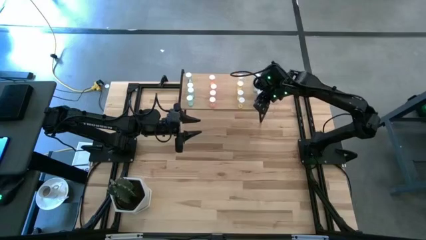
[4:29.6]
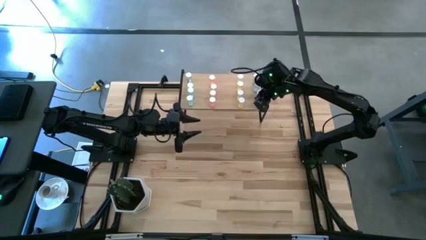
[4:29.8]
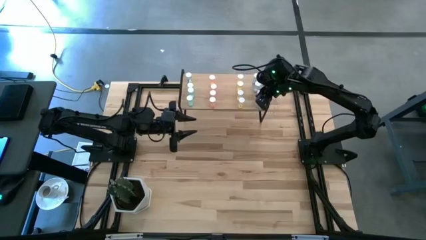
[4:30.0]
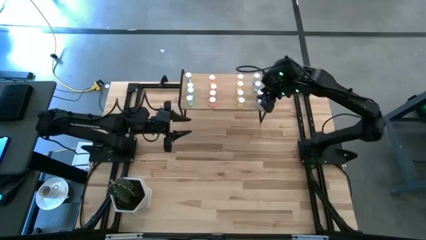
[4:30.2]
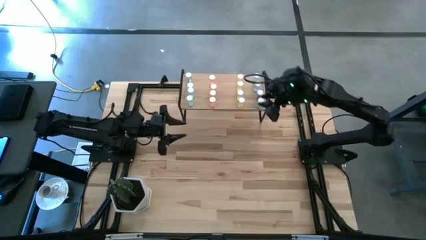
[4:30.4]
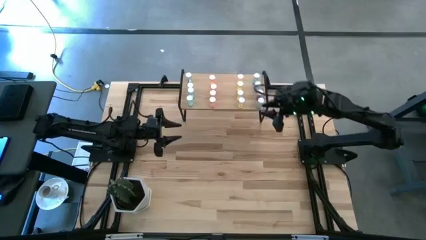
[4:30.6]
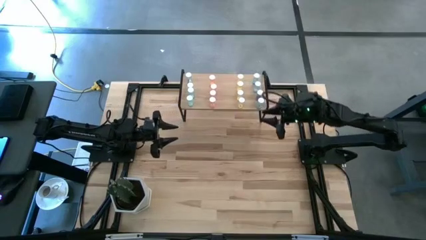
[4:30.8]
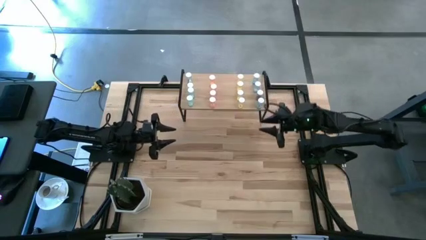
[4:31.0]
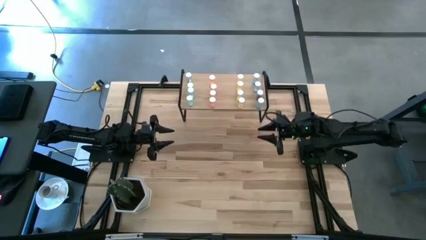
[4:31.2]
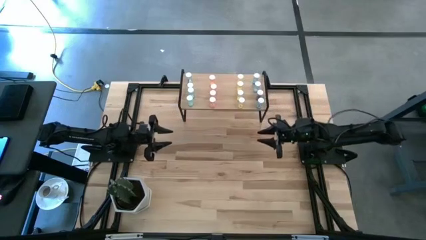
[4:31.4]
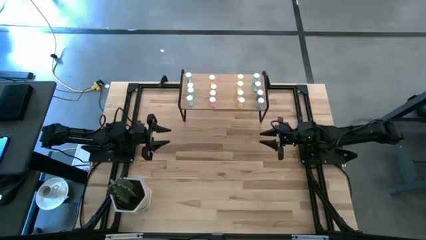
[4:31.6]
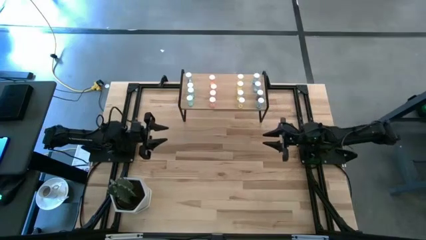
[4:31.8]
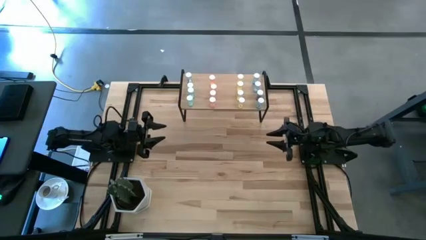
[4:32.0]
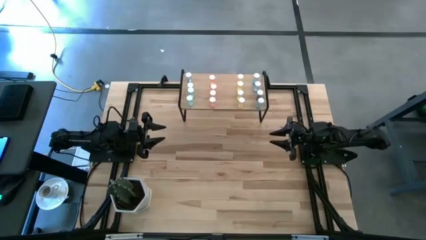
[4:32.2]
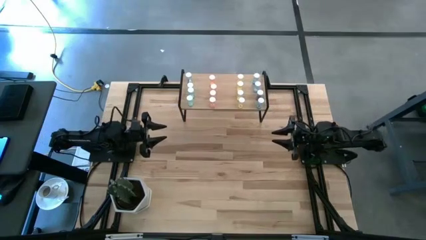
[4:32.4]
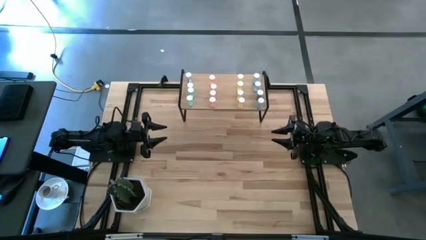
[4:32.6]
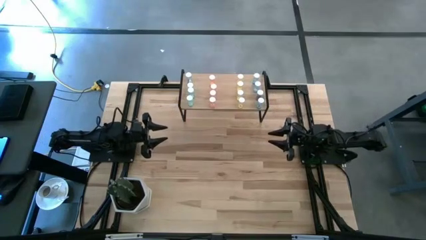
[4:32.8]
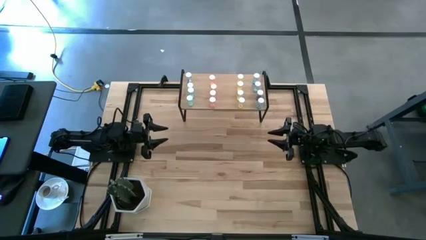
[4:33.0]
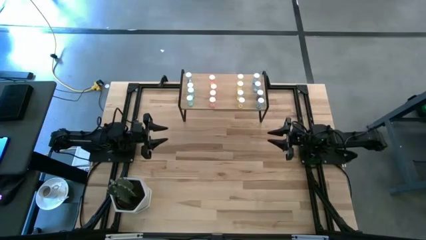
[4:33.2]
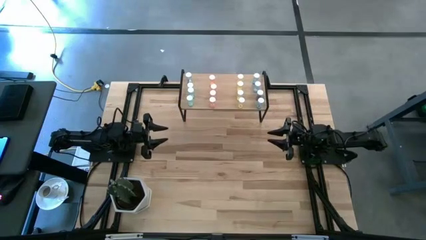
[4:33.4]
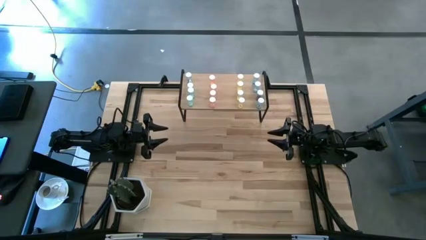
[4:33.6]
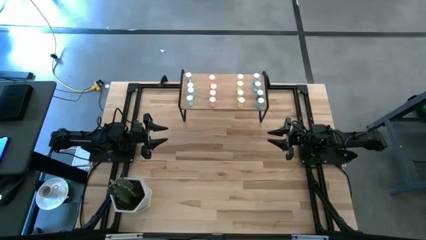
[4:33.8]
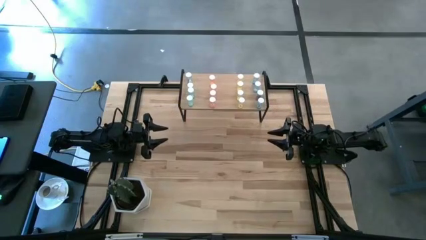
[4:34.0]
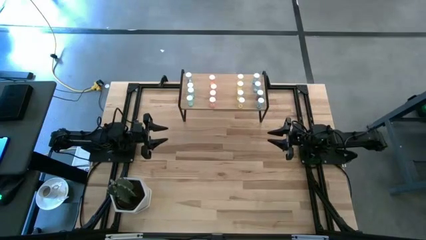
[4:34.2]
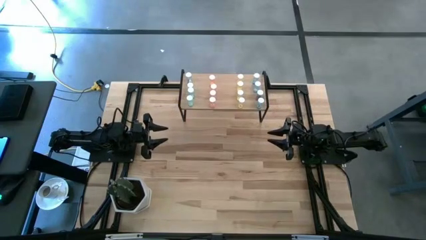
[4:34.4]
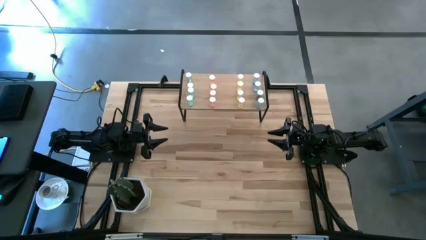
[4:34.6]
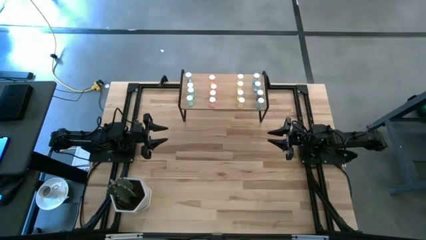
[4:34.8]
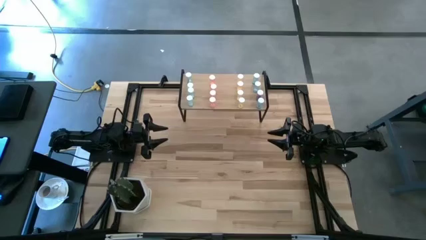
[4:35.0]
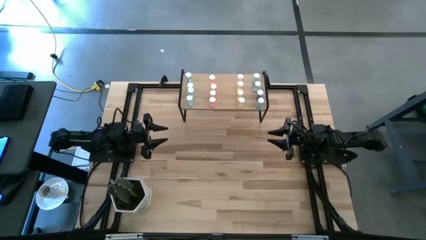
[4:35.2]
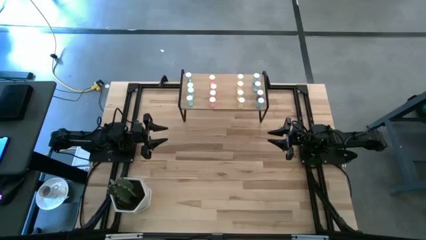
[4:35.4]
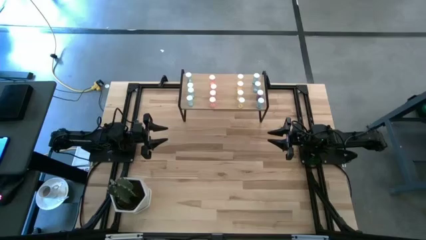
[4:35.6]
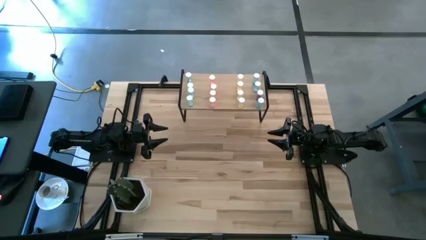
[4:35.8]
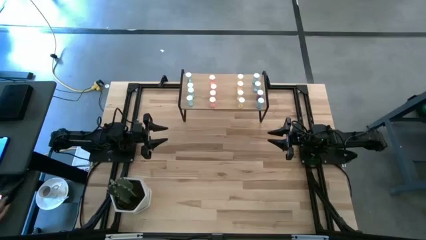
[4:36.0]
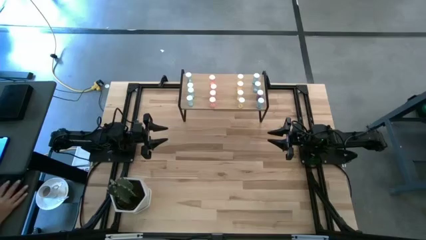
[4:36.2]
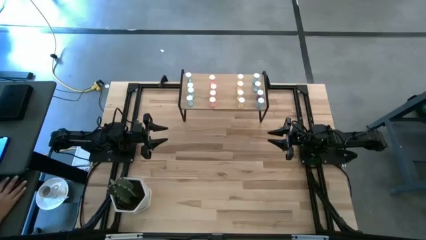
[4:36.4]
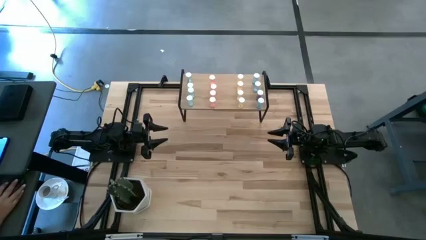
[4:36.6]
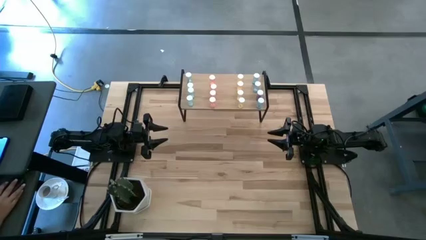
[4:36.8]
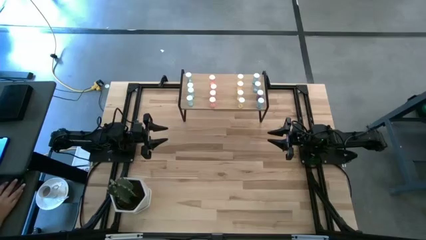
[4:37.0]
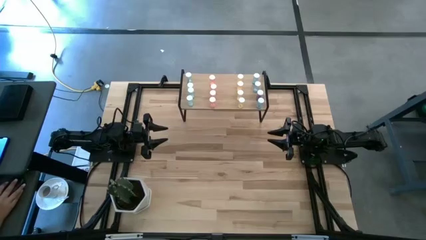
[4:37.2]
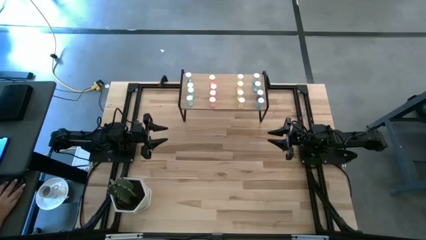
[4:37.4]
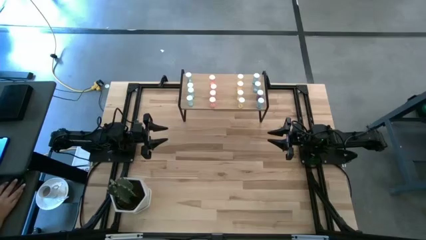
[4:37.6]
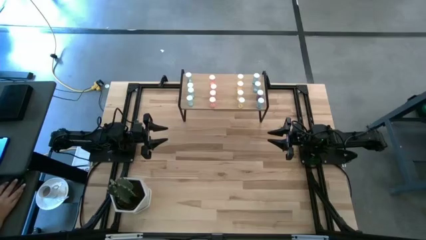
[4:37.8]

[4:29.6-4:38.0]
Task: Pick and place medicine bottles onto shelf by color
Return to Home Position
